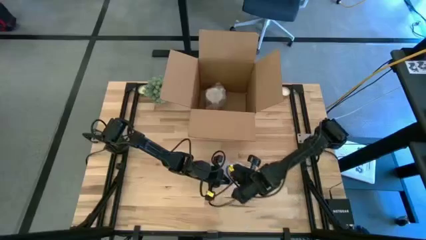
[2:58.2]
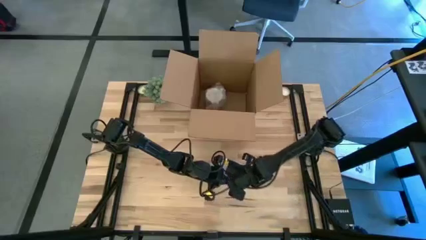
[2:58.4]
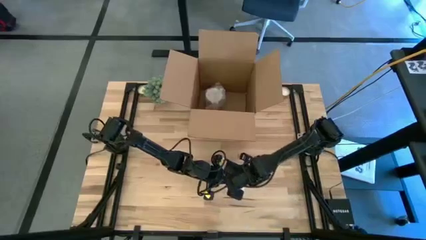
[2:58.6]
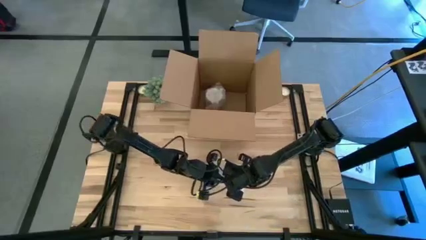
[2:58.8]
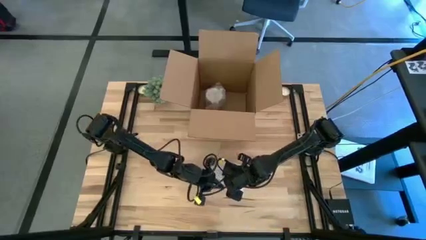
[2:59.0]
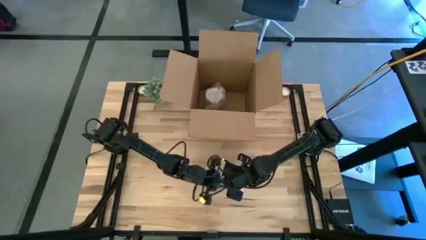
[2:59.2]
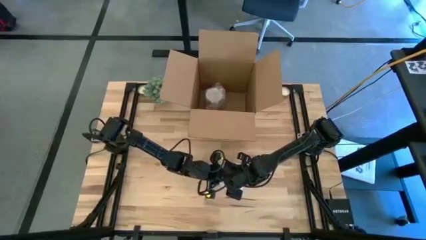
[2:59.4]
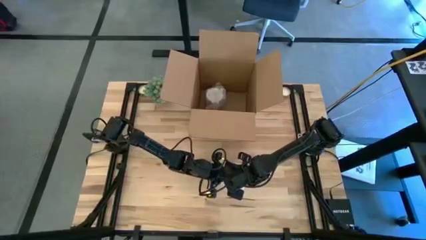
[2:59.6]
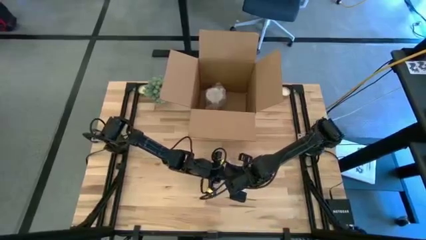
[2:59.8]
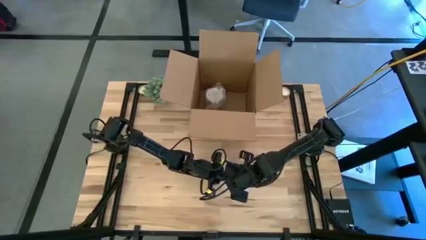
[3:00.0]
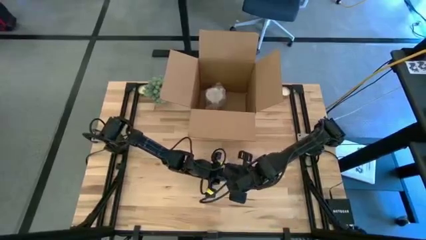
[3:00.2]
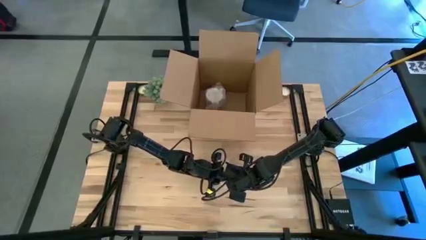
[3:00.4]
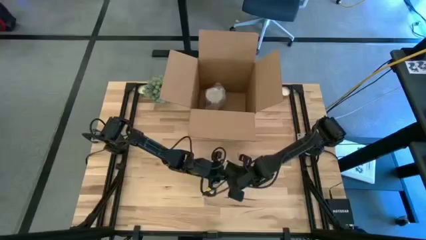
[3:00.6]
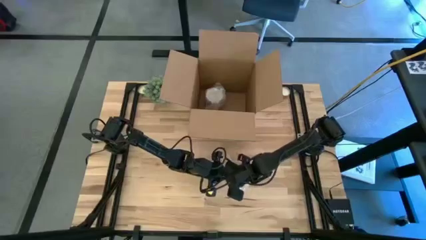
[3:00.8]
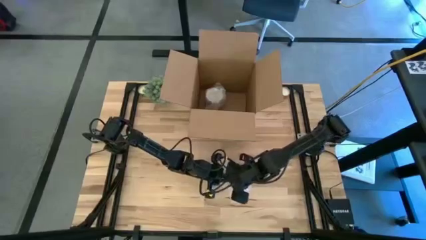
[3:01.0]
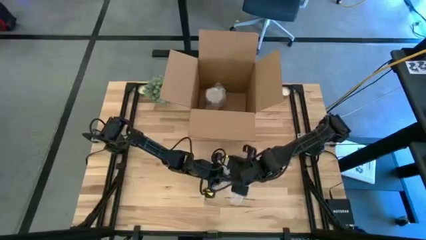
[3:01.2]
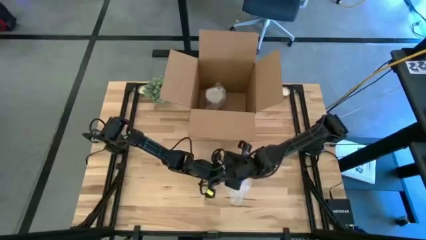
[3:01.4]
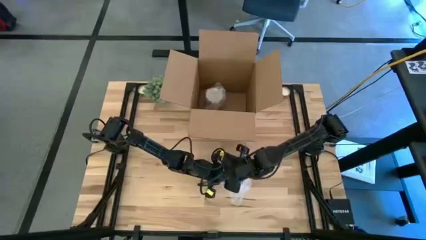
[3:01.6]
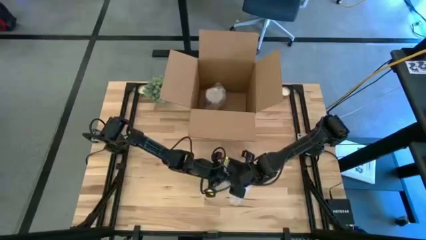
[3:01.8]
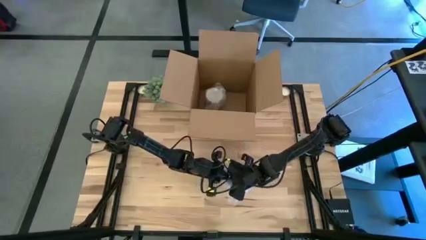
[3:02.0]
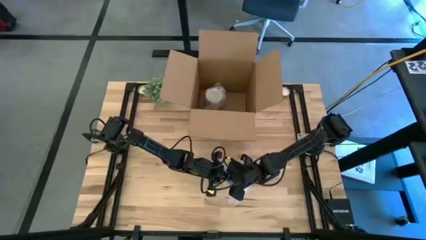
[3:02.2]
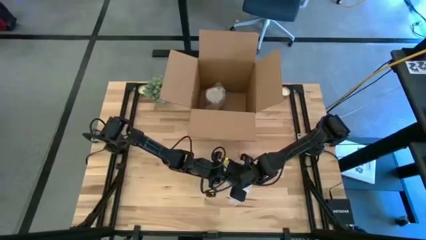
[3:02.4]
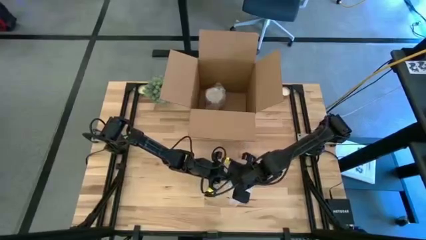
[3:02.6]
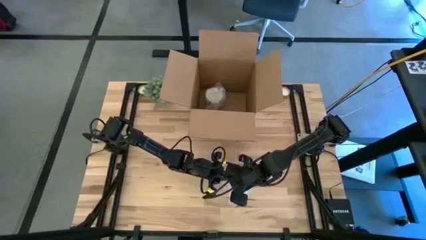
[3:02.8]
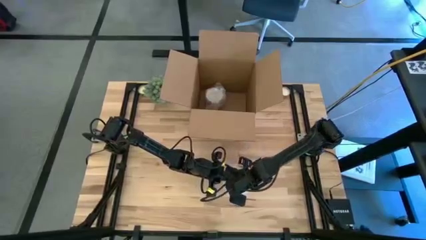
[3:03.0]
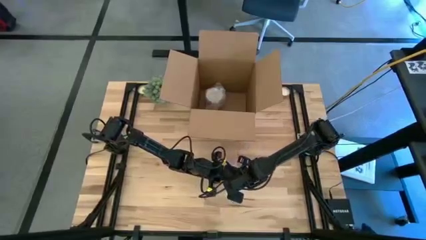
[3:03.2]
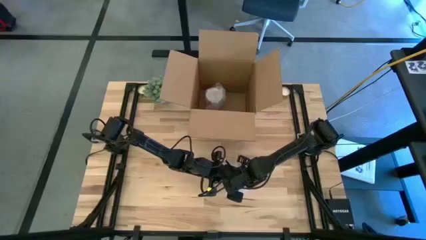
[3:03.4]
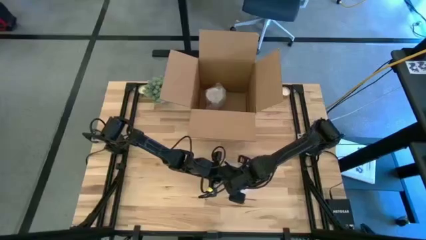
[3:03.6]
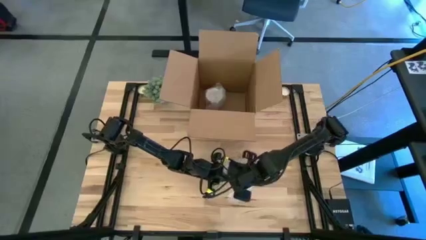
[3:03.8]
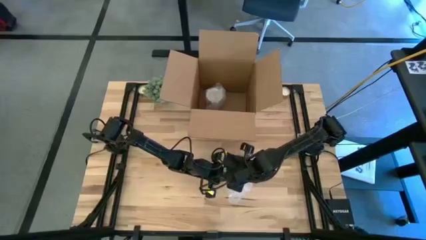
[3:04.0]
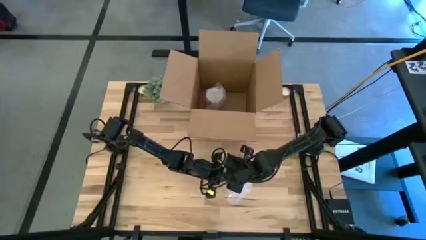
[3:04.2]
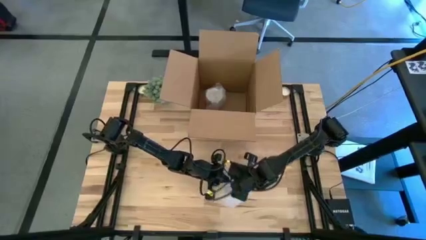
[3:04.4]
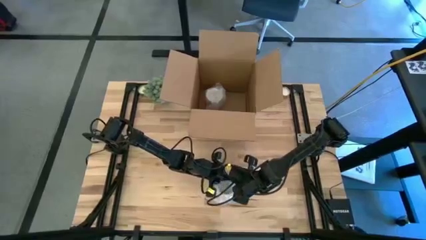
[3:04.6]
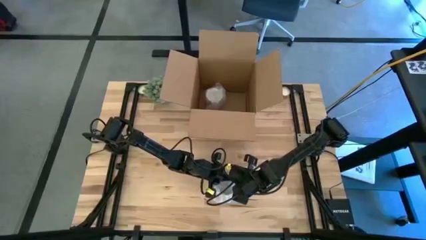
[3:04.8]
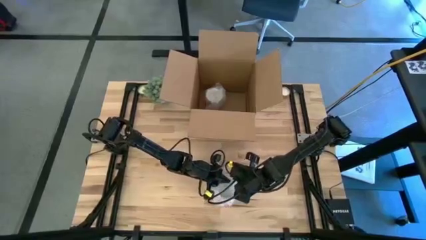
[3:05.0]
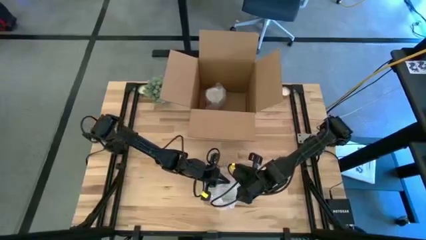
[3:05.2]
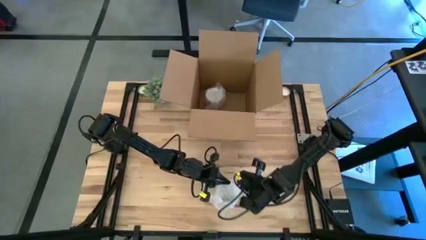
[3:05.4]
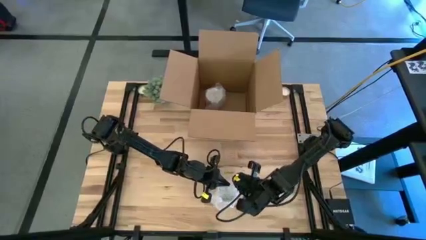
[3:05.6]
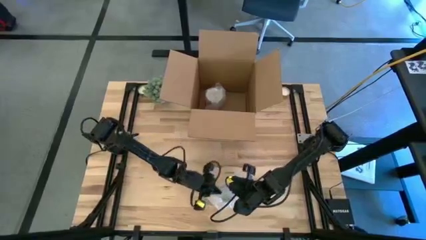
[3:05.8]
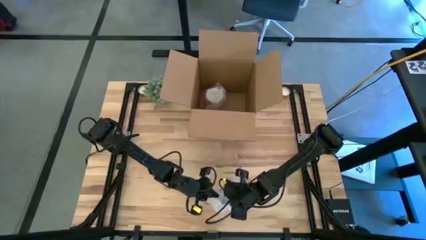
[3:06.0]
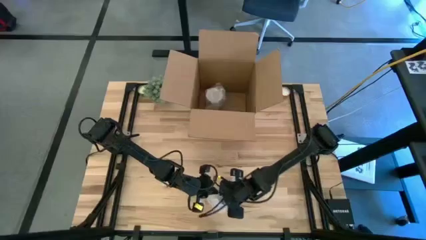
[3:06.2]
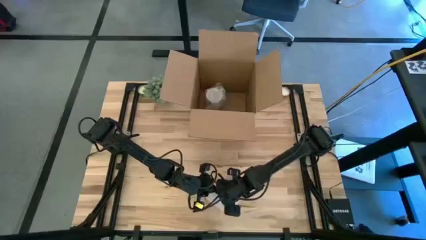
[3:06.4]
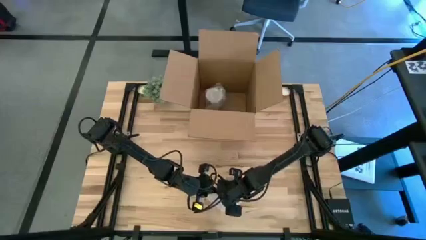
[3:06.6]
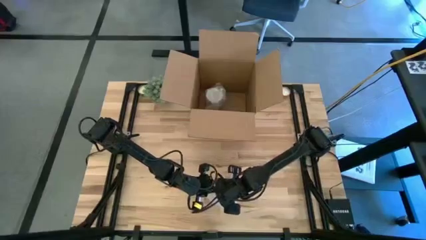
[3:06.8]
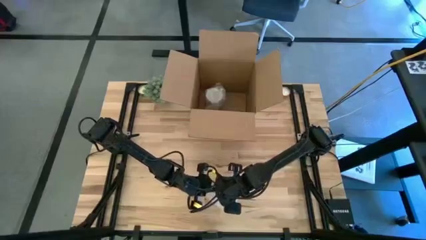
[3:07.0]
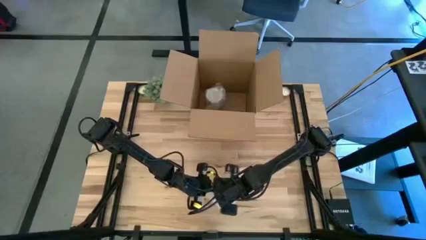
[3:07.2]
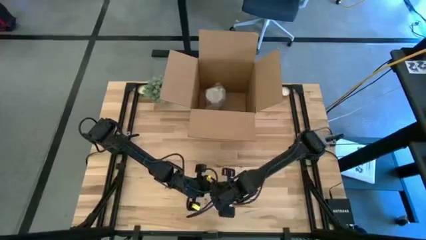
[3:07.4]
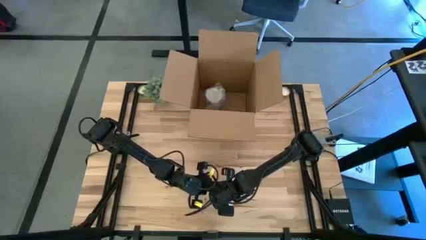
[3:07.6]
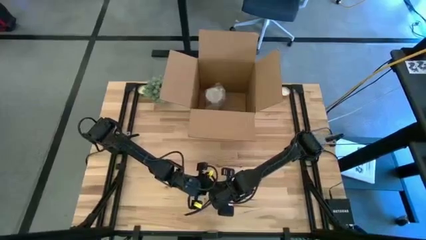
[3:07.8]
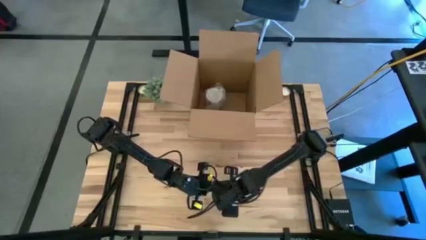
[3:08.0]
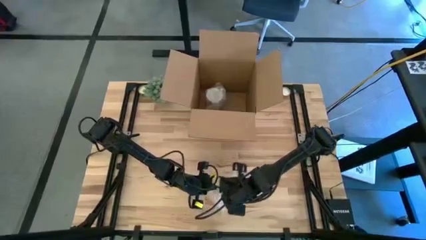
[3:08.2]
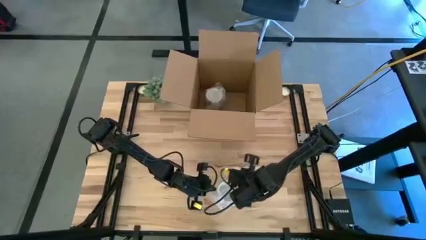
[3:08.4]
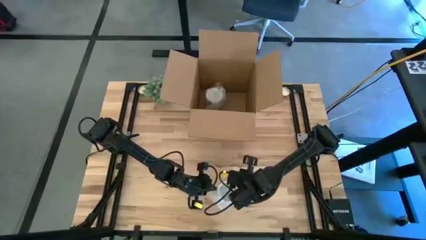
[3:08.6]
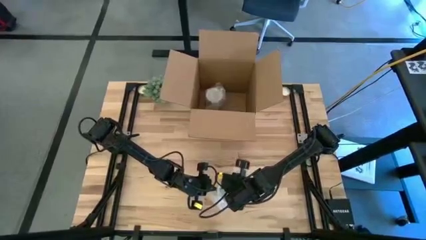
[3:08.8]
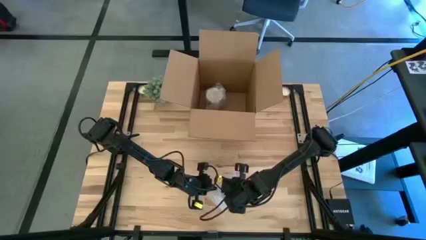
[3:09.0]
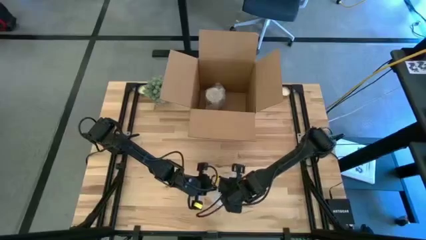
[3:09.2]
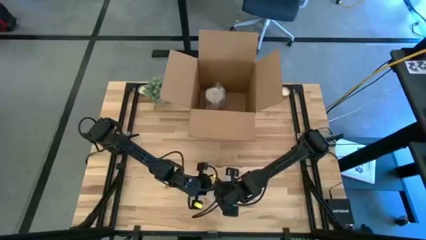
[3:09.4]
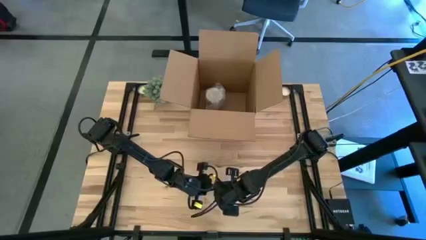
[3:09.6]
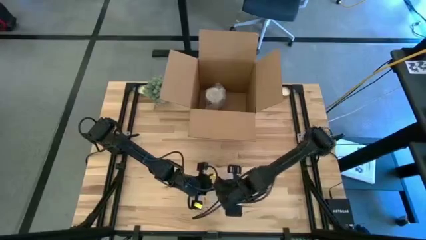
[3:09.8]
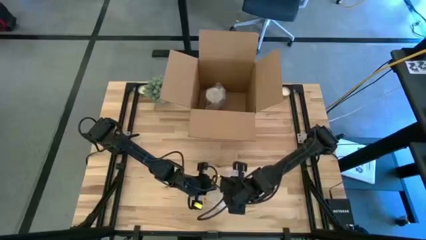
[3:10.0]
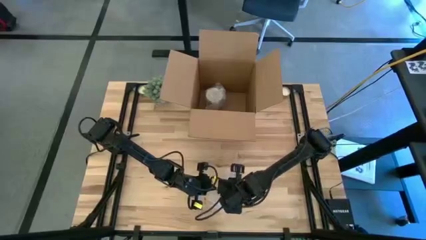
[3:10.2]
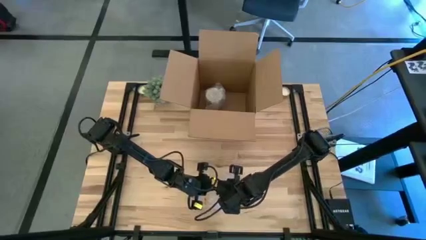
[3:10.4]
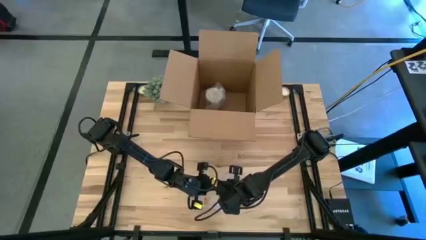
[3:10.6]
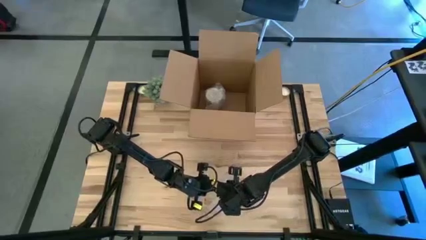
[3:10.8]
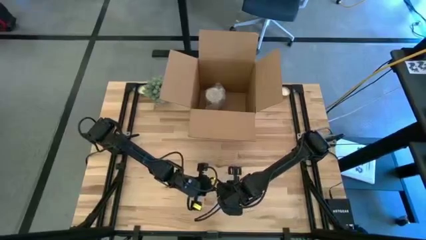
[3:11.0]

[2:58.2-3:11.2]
Task: wrap mug
Wrap the orange mug with bubble wrap

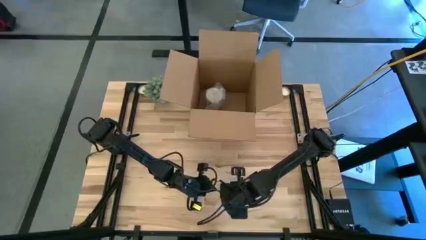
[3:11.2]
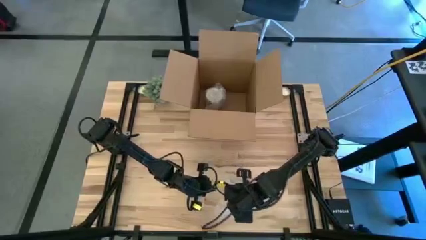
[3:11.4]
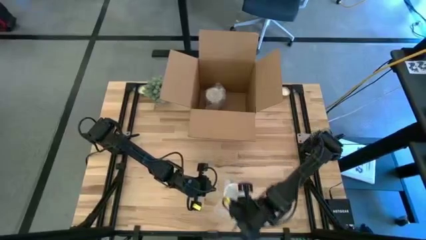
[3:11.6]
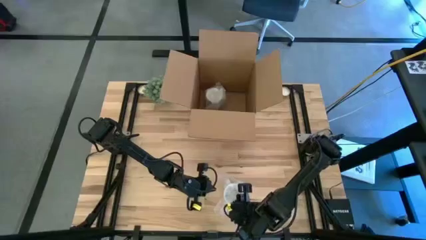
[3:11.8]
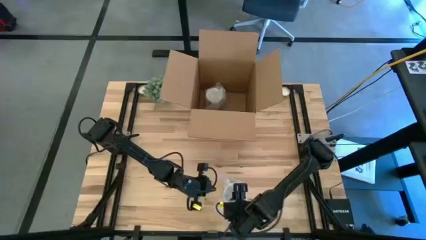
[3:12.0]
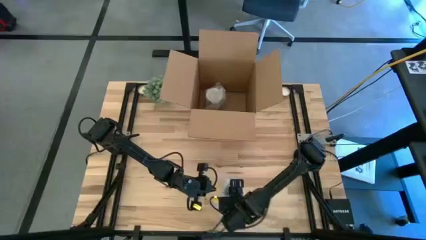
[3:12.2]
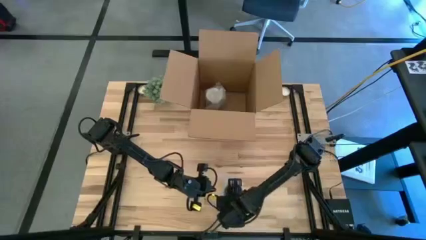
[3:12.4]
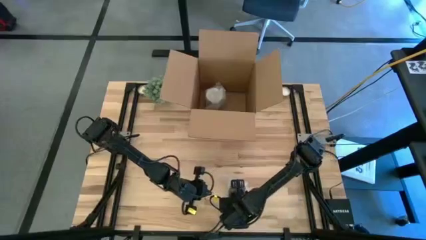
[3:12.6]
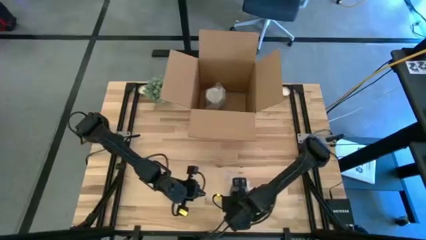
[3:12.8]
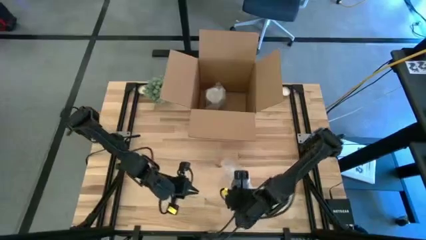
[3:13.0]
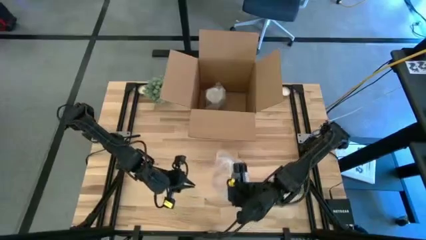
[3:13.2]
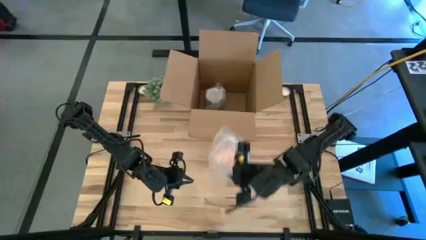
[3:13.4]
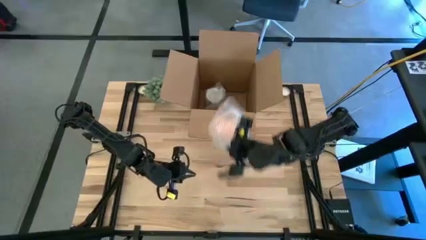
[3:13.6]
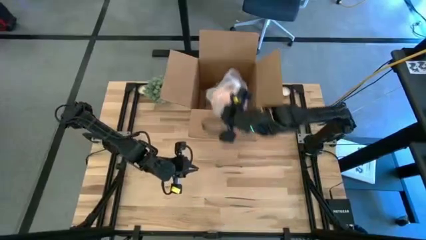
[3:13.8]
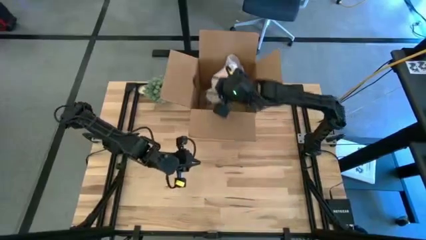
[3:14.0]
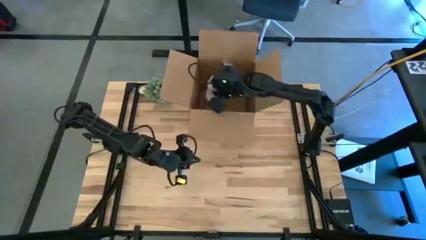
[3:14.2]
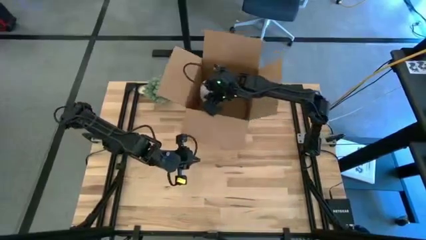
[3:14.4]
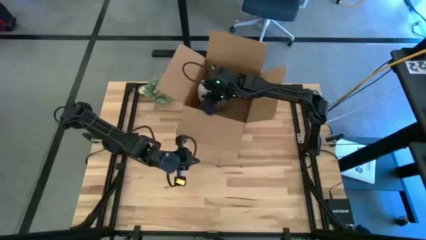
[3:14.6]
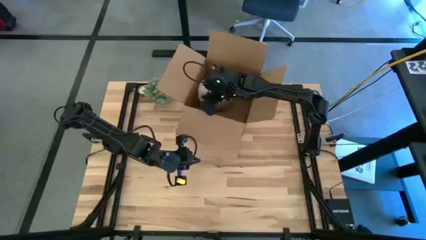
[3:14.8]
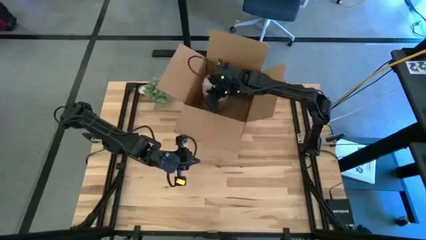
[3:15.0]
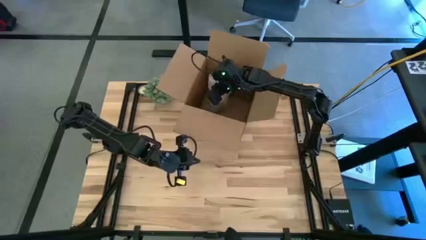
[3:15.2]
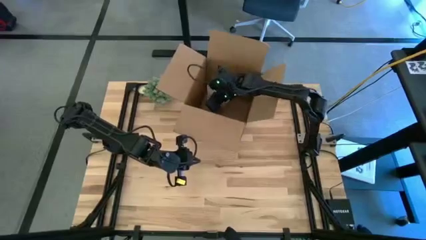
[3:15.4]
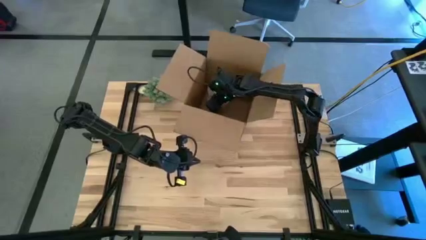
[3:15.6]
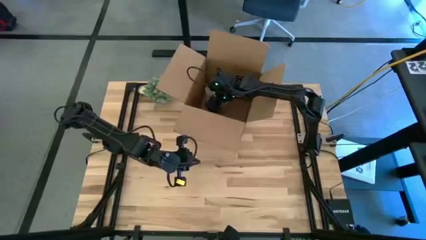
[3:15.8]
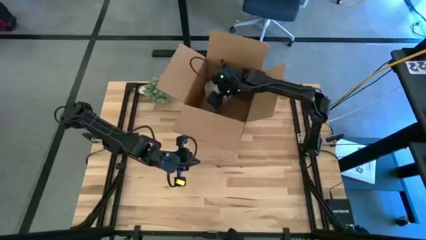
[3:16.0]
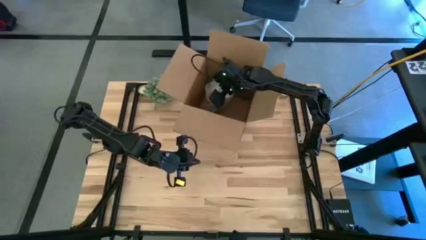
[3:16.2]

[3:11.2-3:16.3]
Put the wrapped orange mug into the cardboard box
